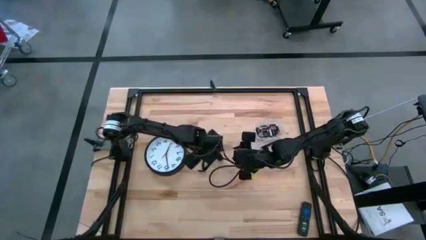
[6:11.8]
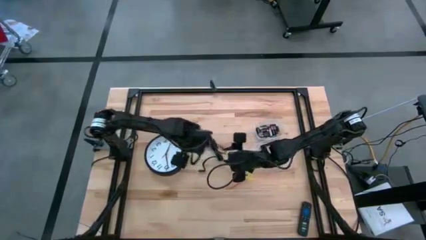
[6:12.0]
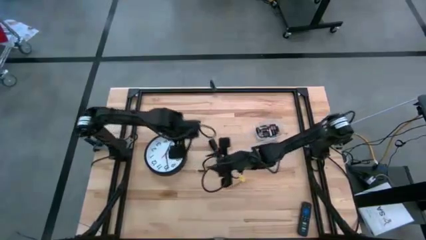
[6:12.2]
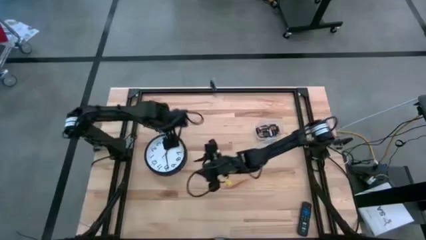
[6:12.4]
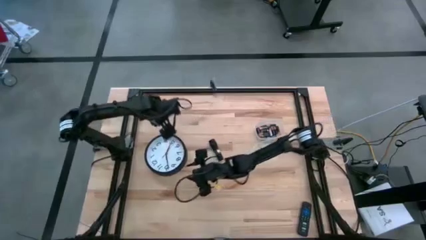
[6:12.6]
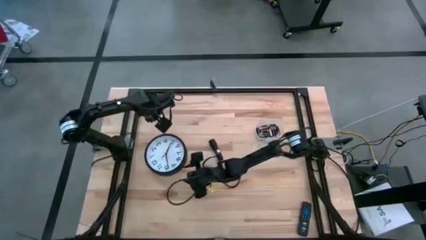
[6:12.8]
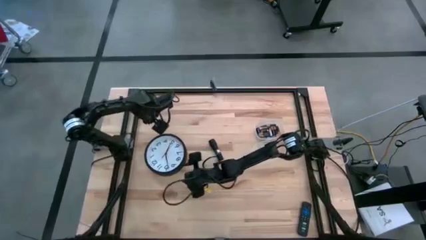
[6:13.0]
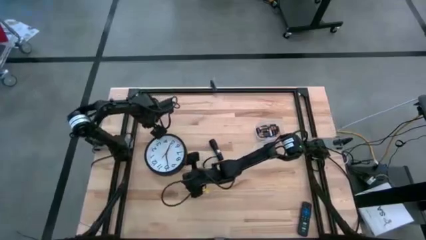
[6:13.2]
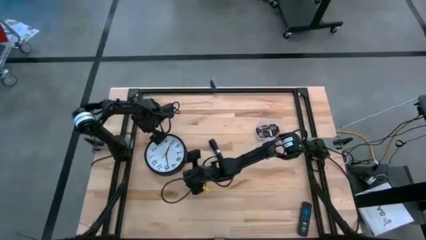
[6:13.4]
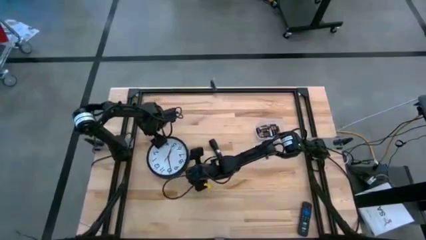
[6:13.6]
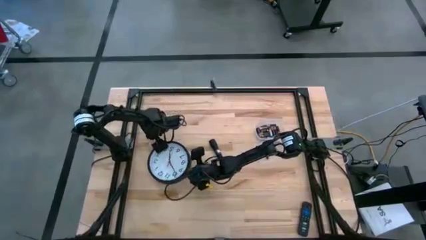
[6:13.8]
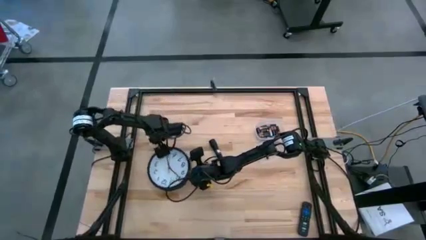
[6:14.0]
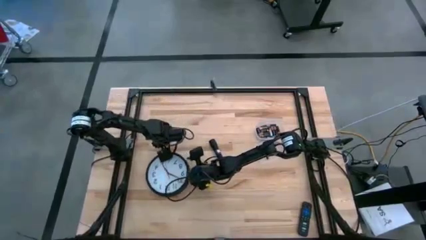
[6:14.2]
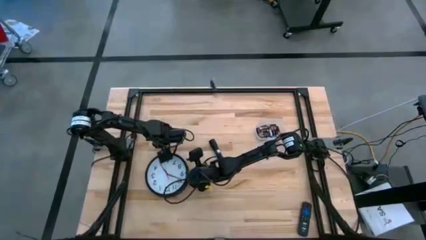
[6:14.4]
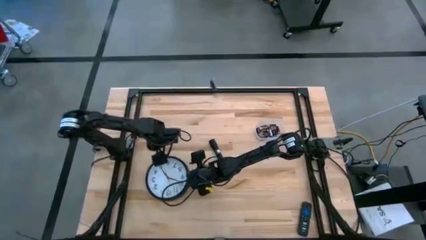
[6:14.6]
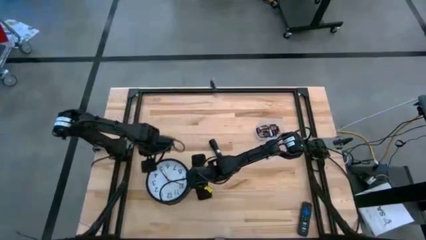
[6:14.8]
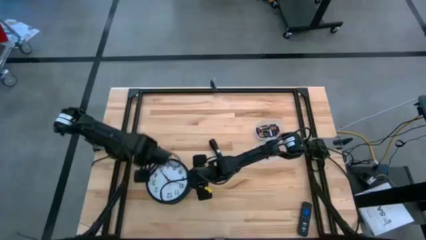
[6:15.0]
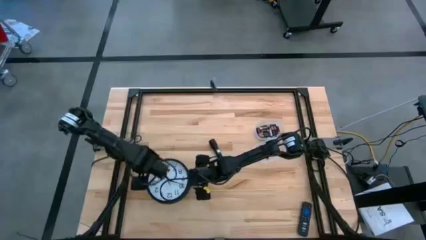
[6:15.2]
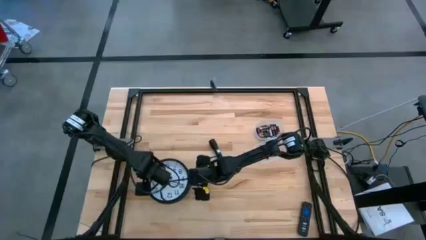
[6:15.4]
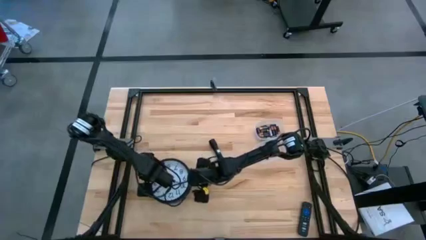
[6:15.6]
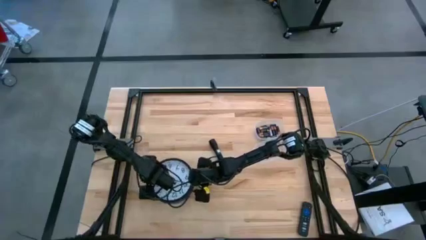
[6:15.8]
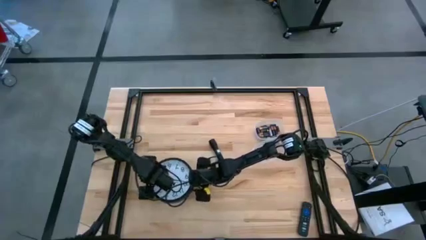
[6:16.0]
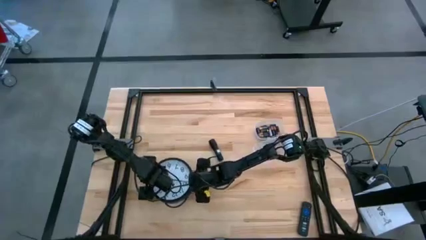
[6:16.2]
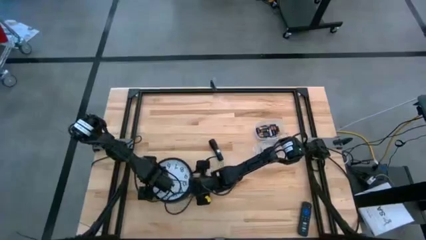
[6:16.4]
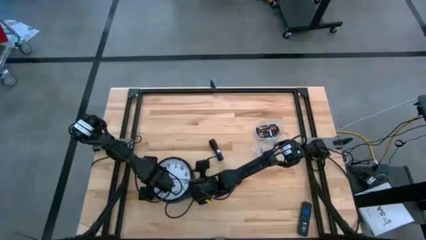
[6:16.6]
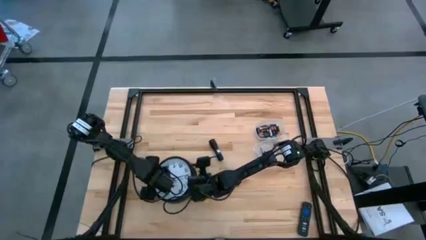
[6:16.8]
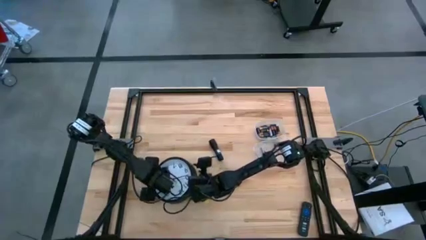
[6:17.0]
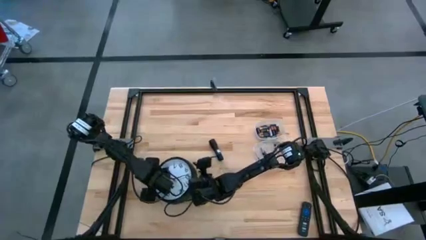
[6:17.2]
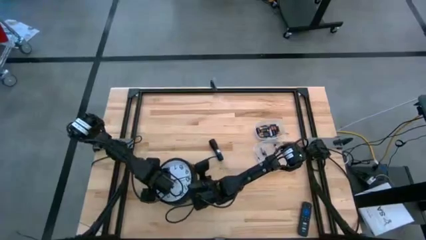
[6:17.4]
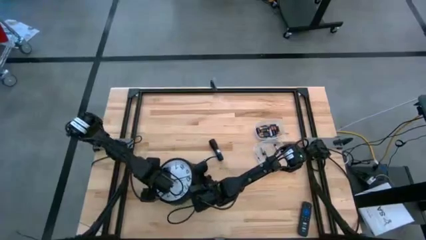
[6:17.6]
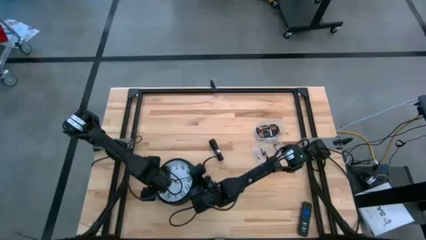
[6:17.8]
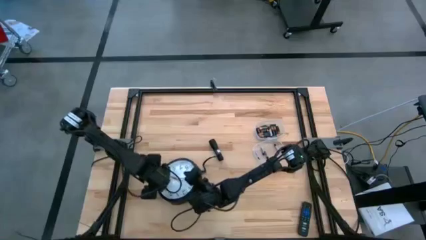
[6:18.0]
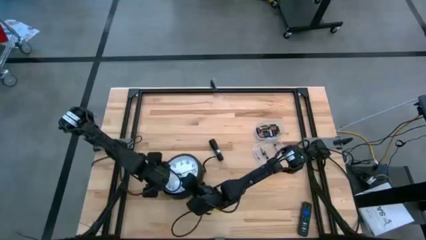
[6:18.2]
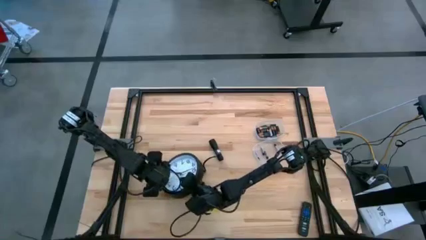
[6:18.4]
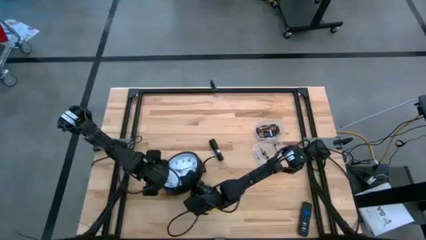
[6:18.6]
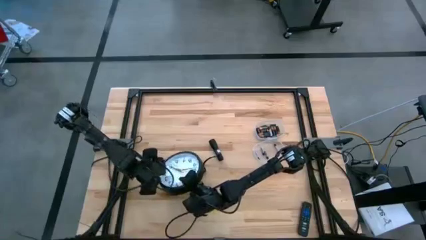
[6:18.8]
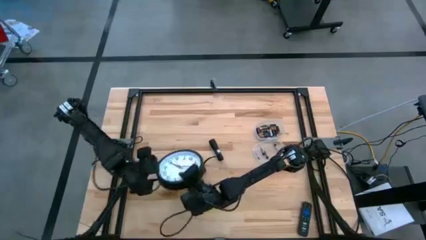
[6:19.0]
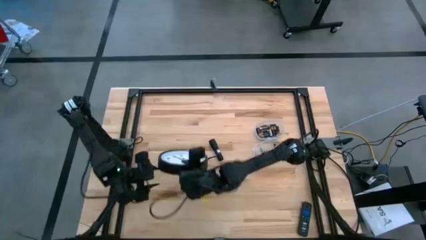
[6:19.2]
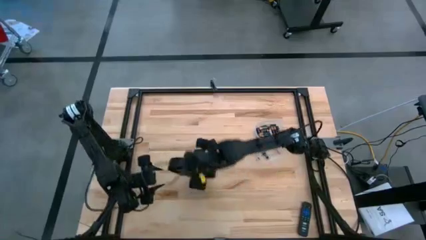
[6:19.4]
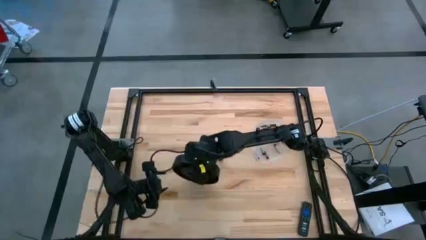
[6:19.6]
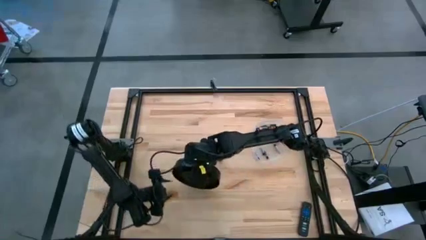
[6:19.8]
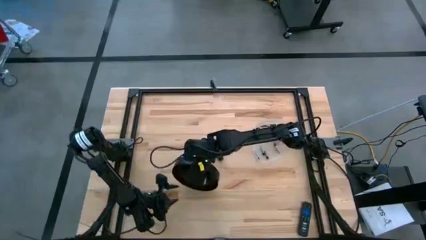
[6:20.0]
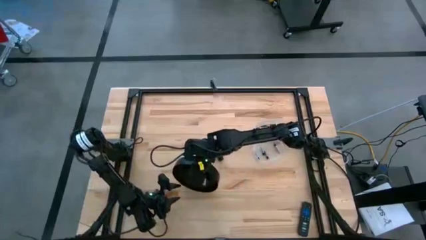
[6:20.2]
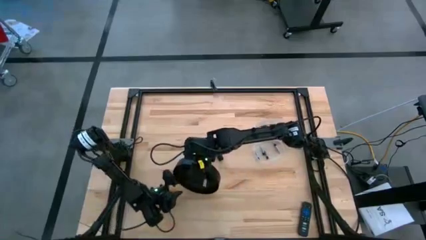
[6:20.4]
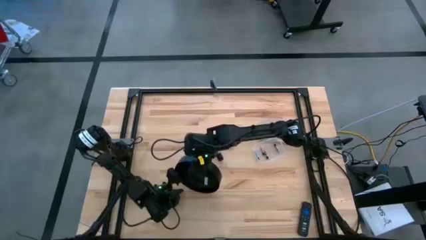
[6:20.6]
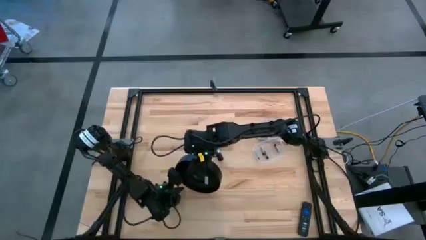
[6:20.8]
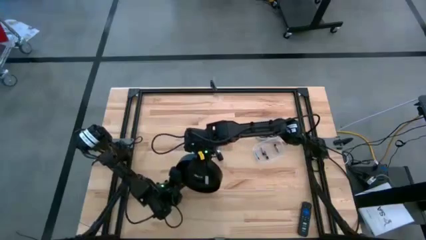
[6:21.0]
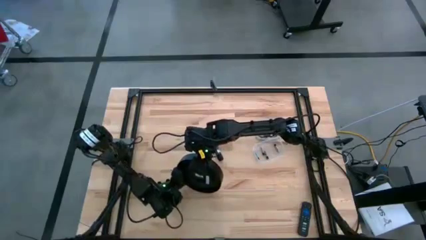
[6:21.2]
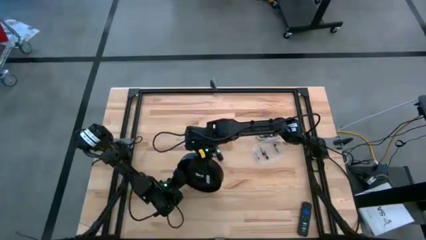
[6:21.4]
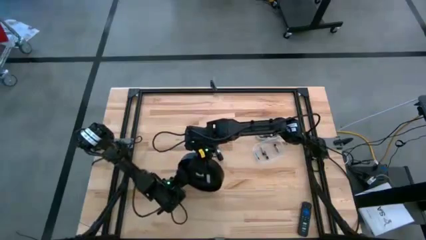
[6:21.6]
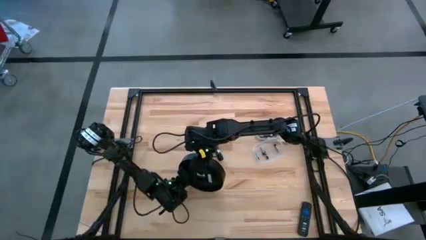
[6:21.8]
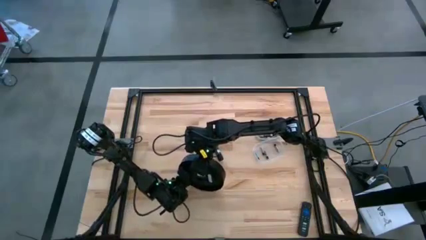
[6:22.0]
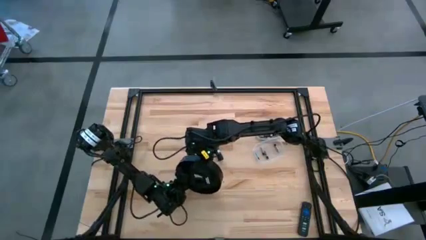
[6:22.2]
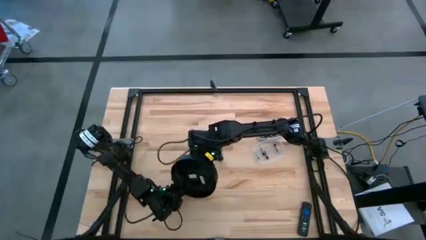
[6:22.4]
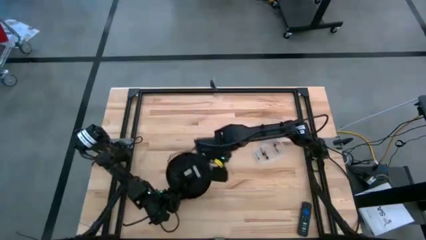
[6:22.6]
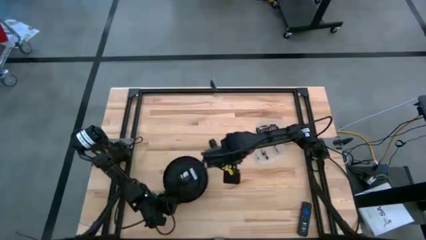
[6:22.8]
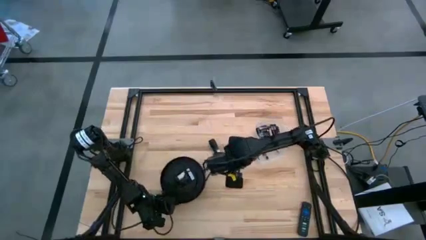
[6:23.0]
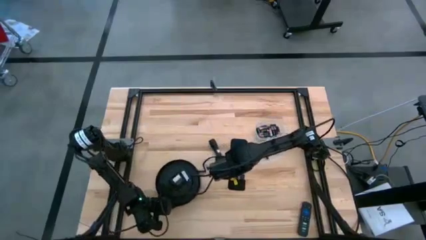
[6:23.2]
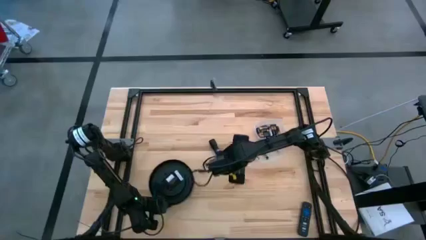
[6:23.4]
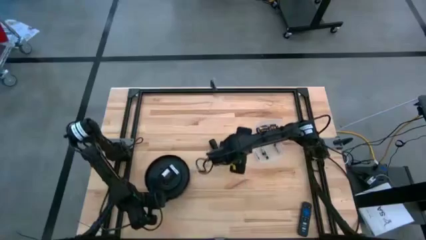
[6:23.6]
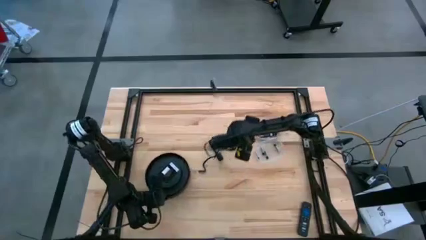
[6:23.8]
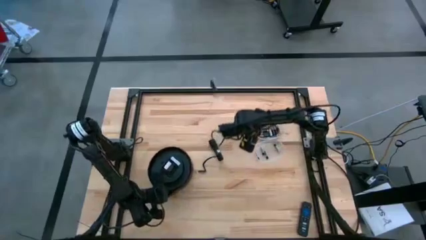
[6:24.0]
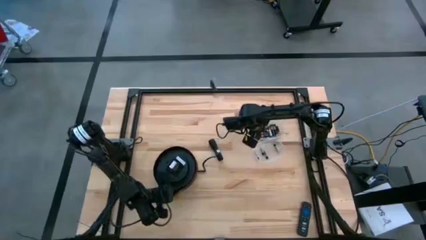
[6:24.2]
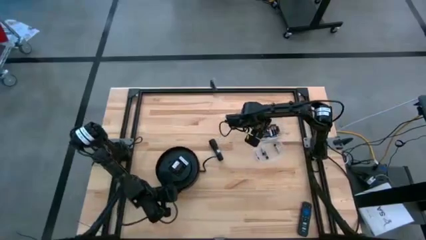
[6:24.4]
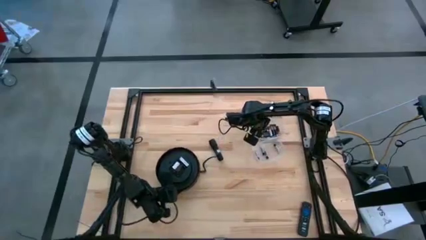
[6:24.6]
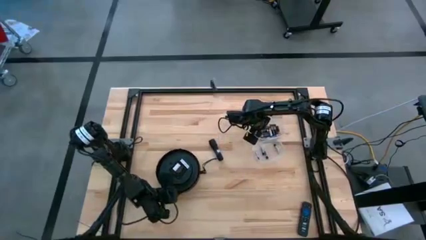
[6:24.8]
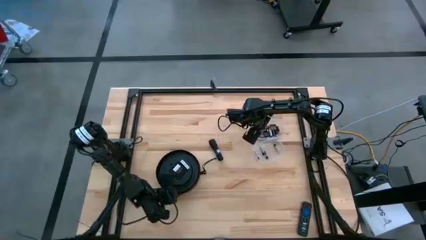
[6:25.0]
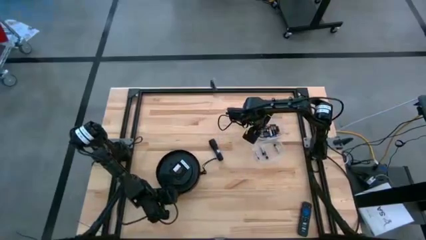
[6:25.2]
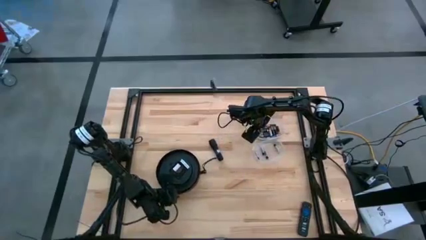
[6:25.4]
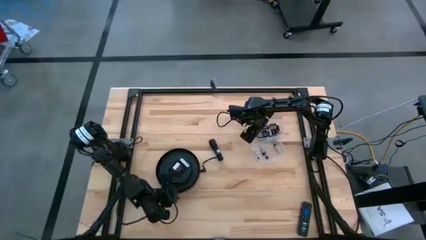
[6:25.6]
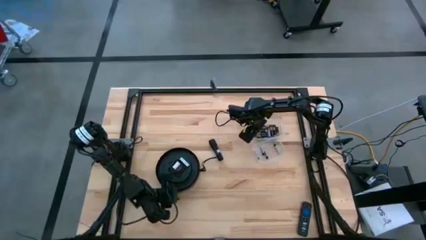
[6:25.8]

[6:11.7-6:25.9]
Task: Insert battery
Insert the black battery into the clock battery compartment

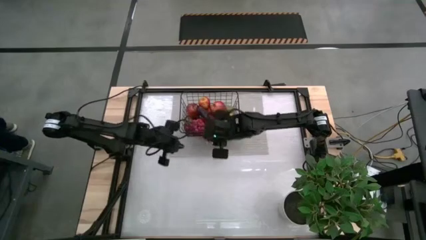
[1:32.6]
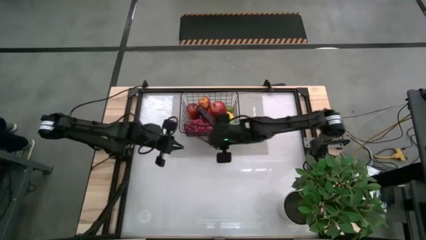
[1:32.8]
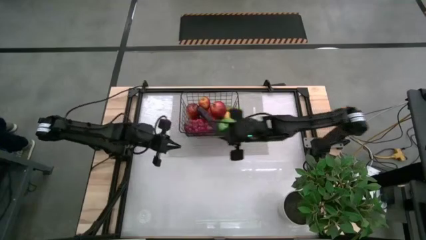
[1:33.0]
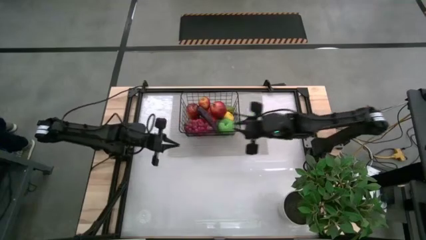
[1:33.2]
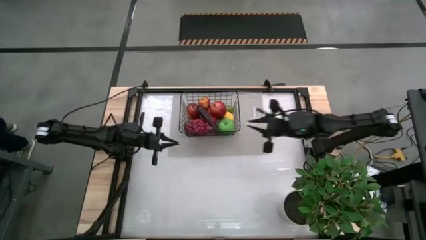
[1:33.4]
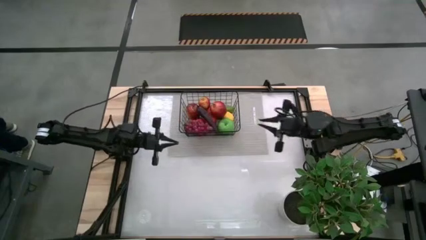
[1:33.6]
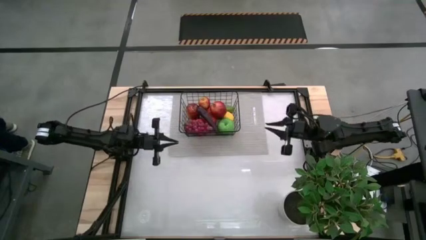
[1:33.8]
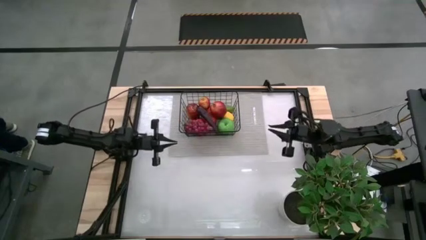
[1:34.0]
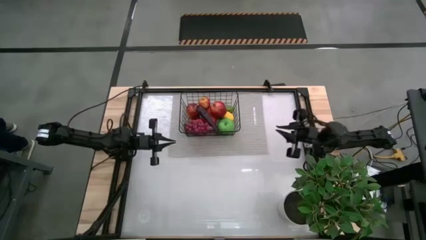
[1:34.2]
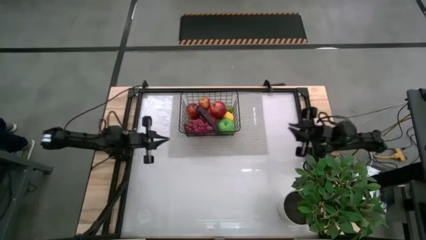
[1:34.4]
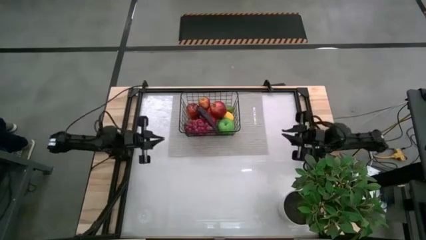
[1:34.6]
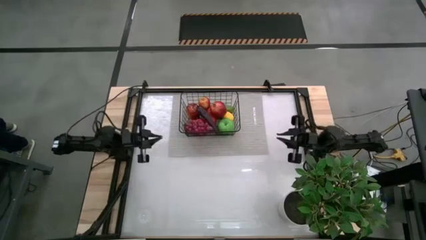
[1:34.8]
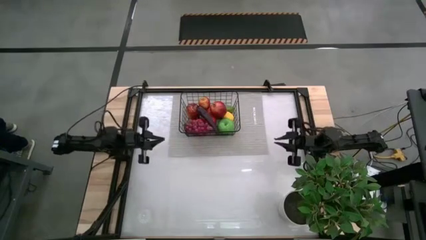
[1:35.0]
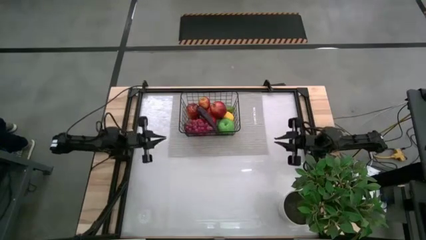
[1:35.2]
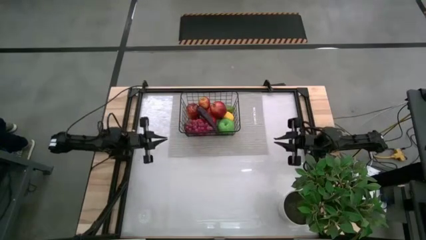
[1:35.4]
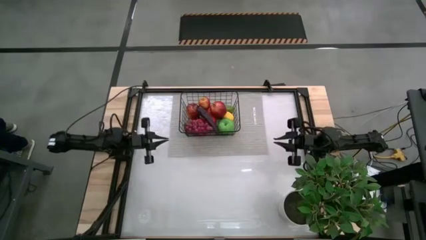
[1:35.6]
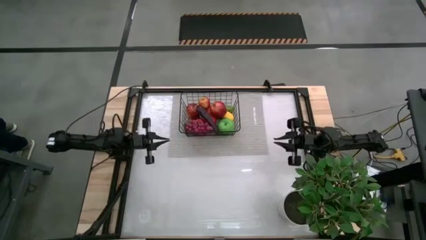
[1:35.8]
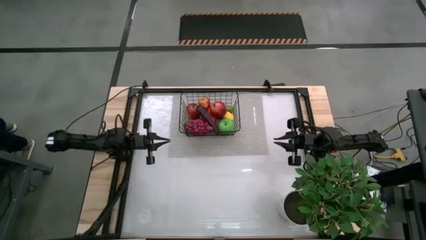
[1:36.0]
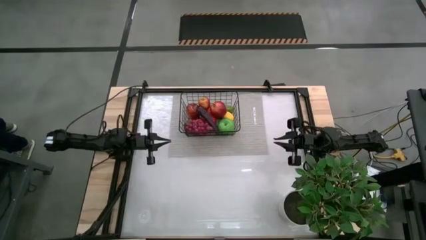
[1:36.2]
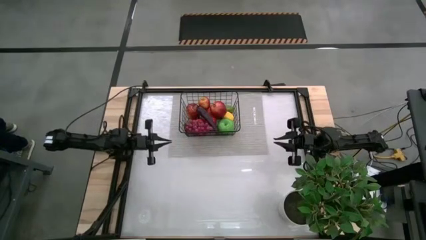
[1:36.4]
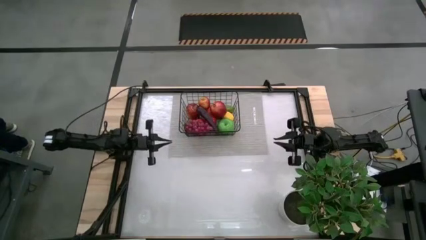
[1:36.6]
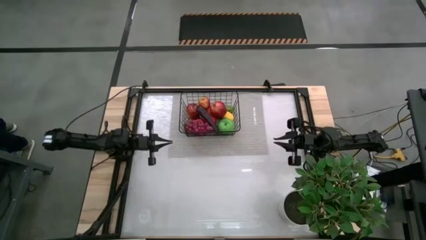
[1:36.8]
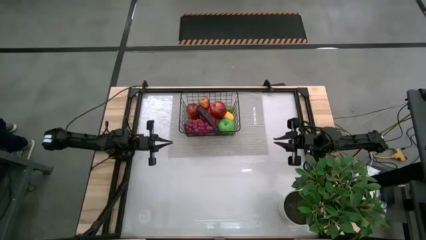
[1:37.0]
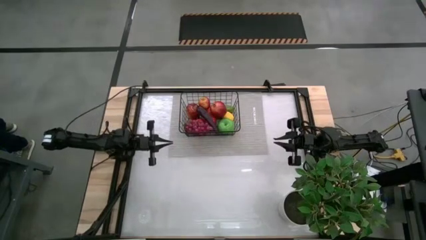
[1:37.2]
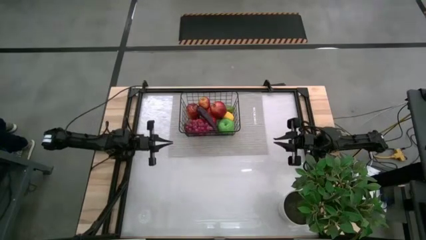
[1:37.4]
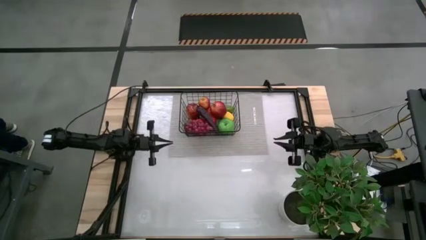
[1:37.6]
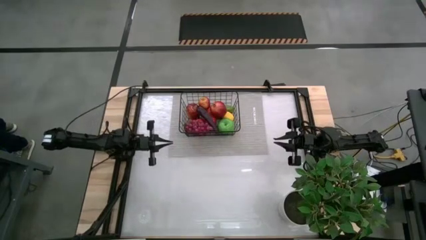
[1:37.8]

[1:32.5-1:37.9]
Task: Build produce basket
Return to Home Position
